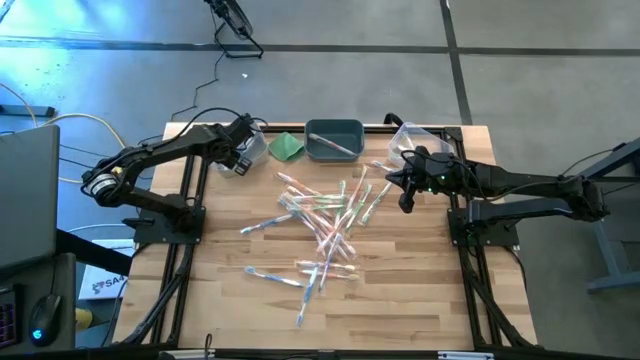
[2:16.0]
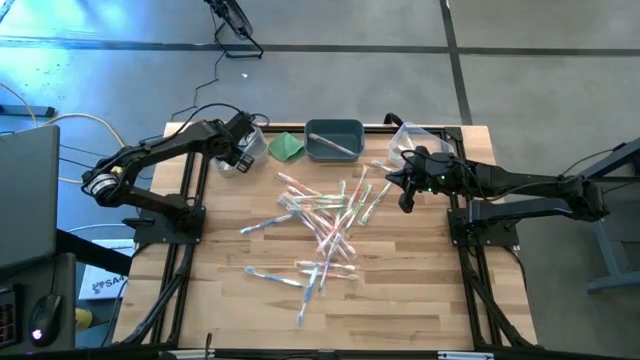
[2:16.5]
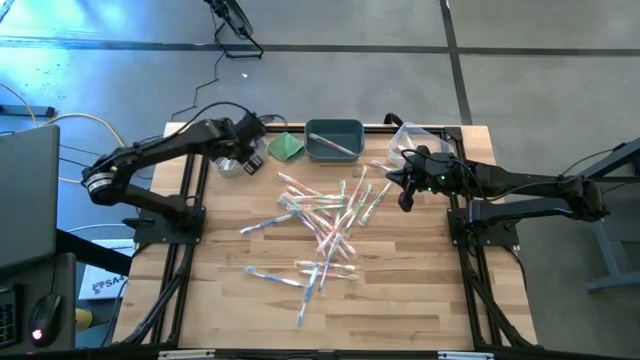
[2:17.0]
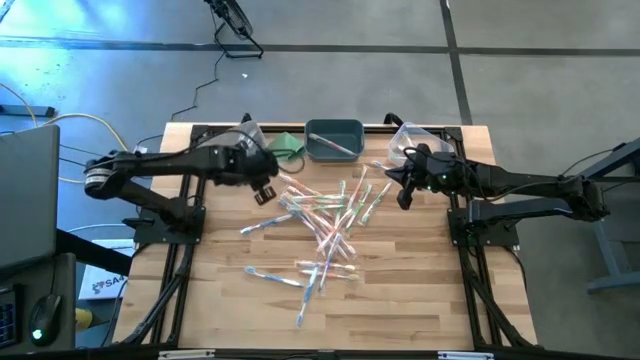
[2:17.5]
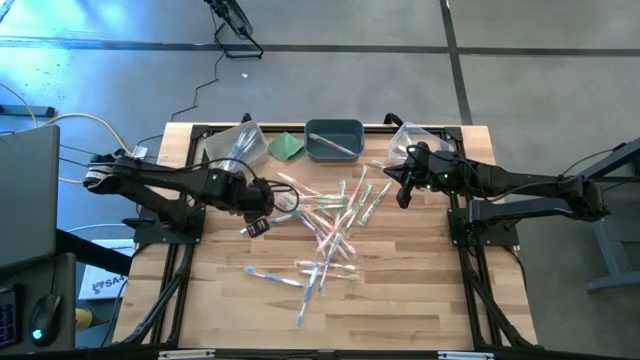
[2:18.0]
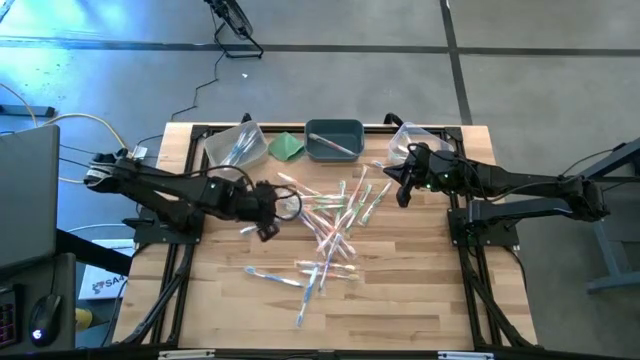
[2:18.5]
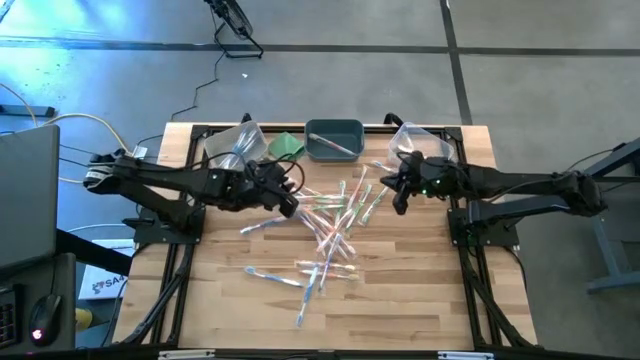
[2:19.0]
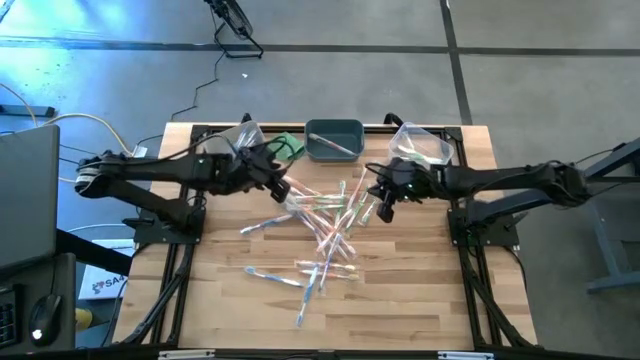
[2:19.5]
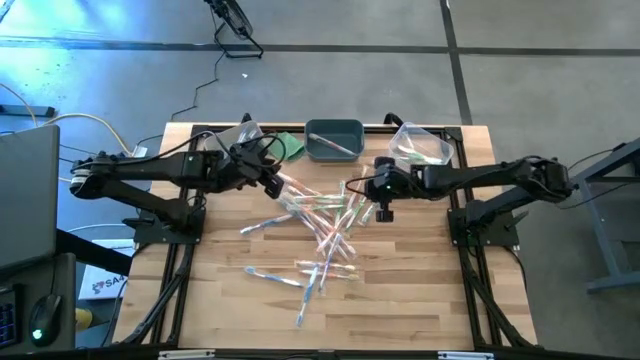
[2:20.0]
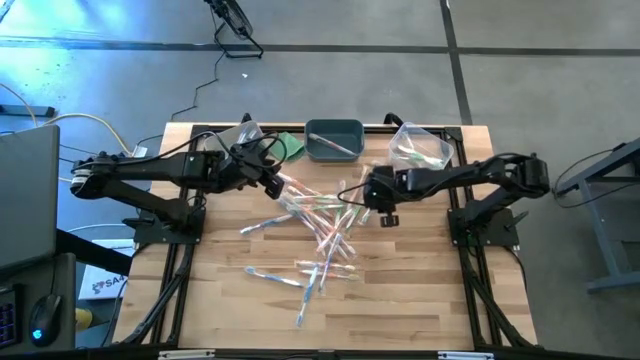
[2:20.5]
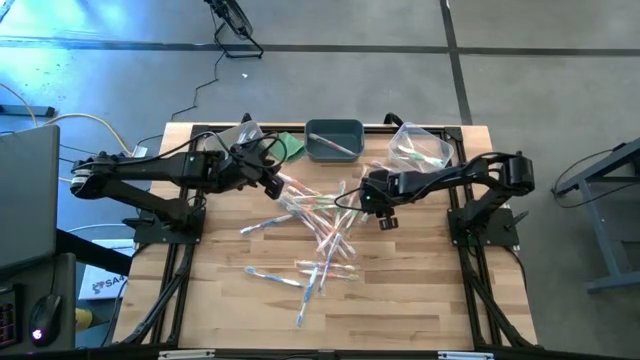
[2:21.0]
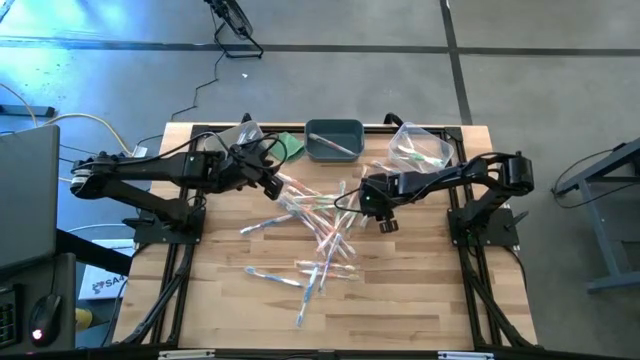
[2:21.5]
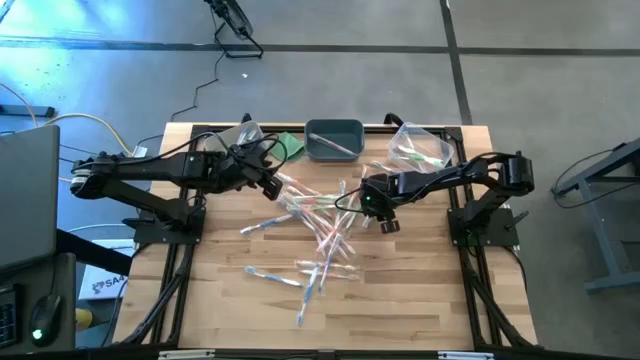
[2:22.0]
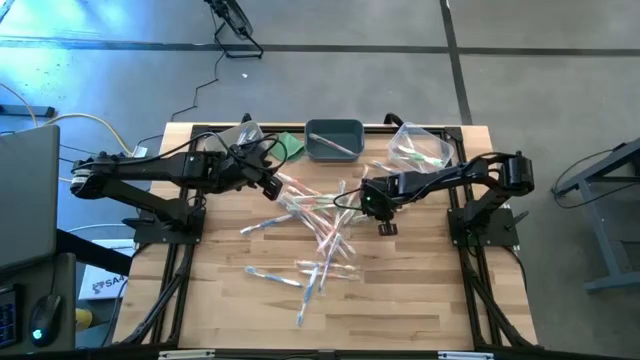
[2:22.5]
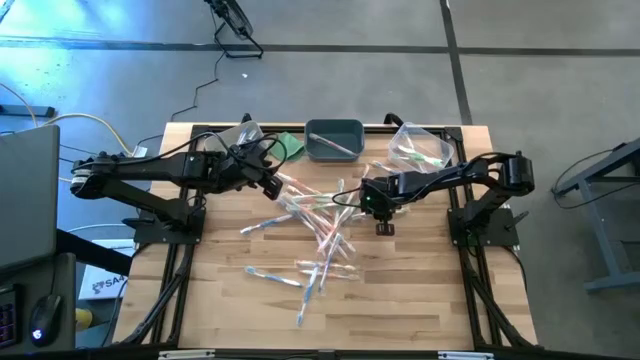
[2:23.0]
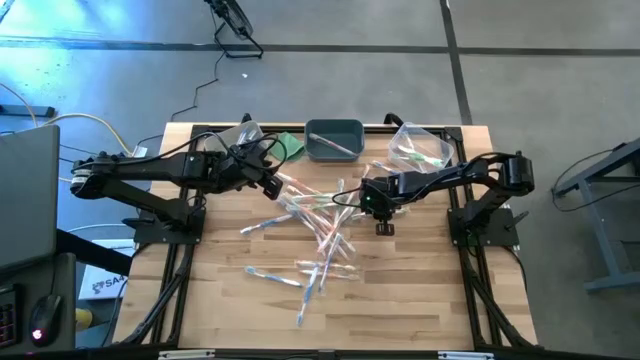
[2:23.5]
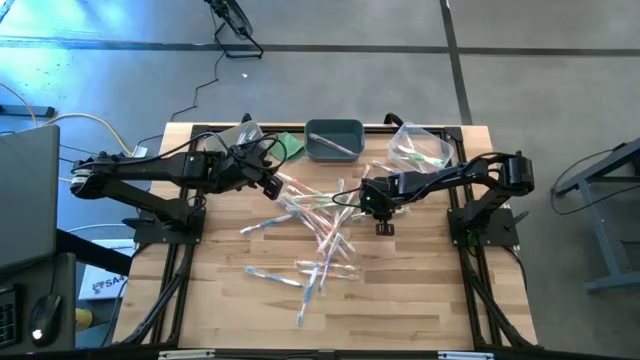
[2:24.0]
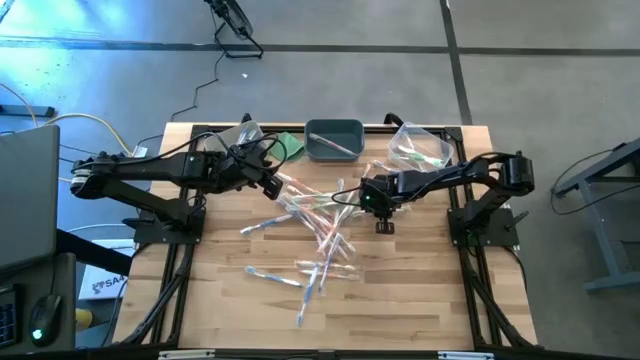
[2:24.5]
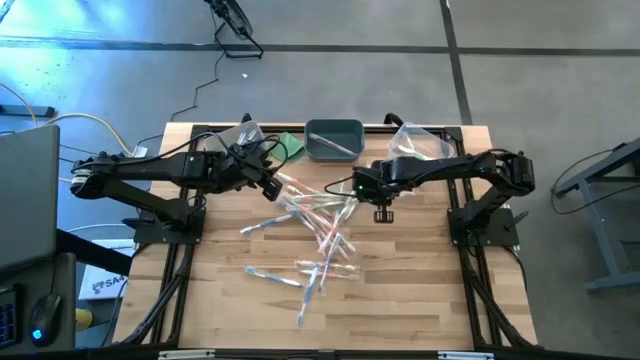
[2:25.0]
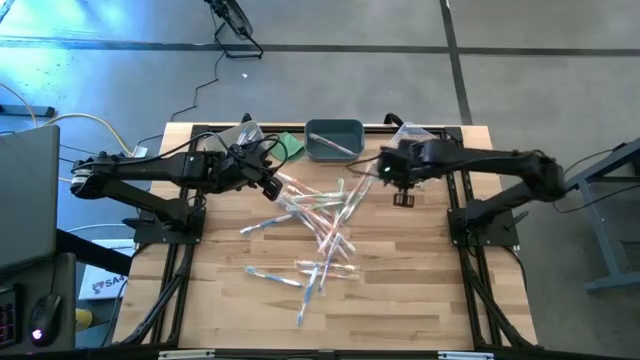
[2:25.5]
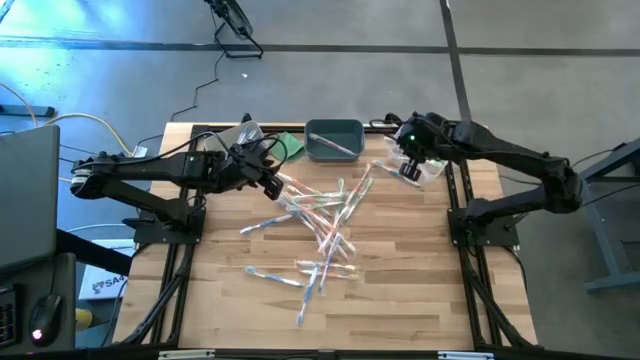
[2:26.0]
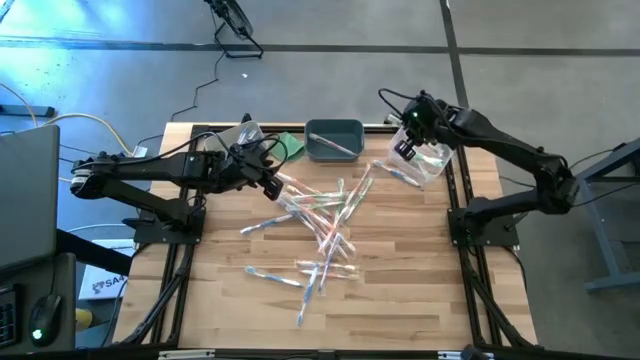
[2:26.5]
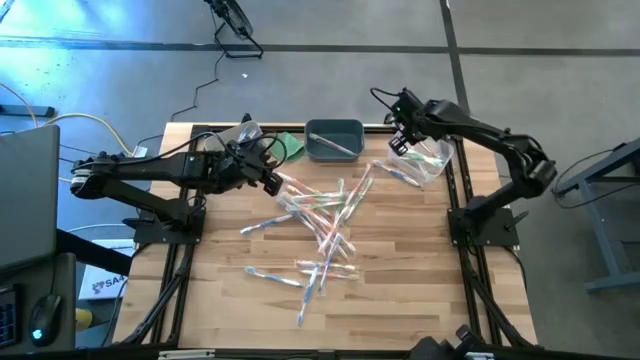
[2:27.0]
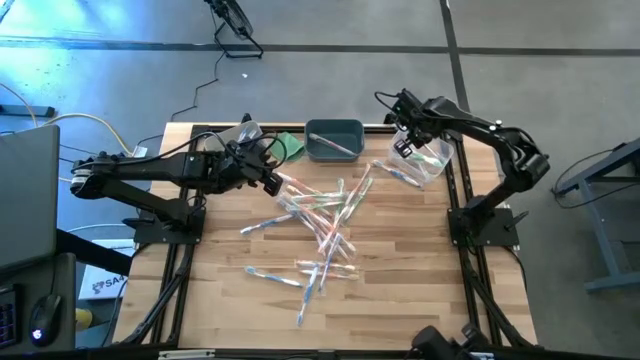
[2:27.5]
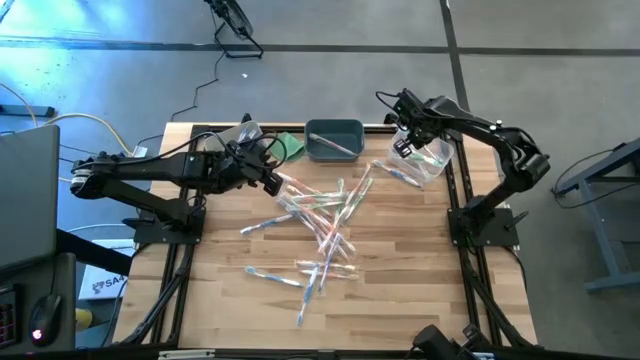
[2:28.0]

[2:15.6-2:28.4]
Task: Pick & Place Toothbrushes
Put the green toothbrush into the transparent bin

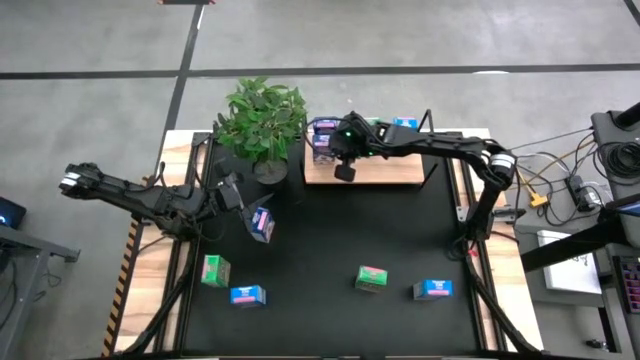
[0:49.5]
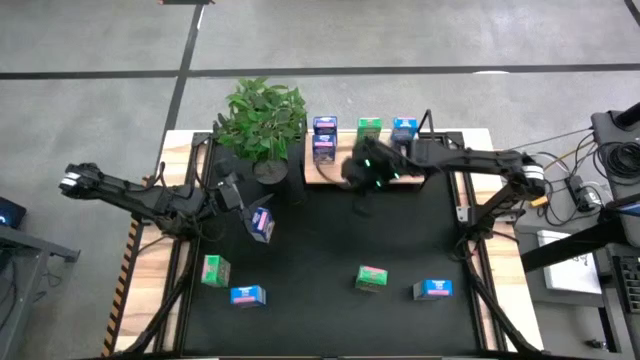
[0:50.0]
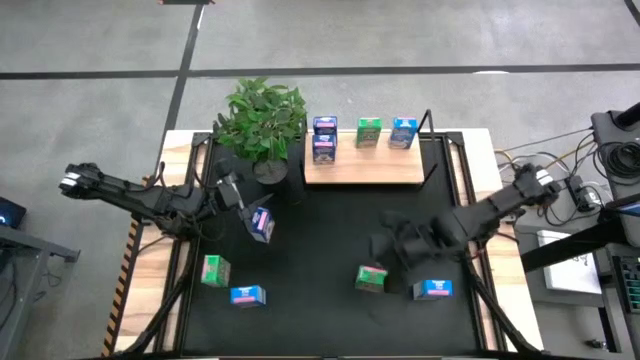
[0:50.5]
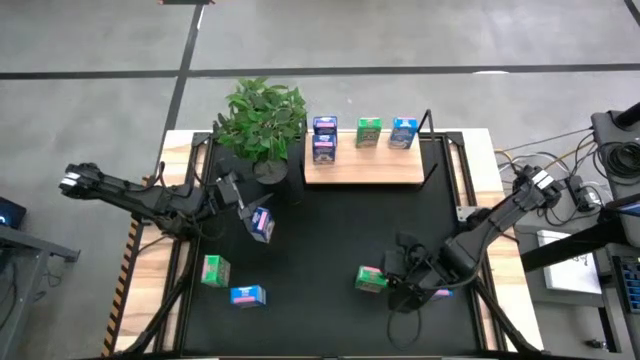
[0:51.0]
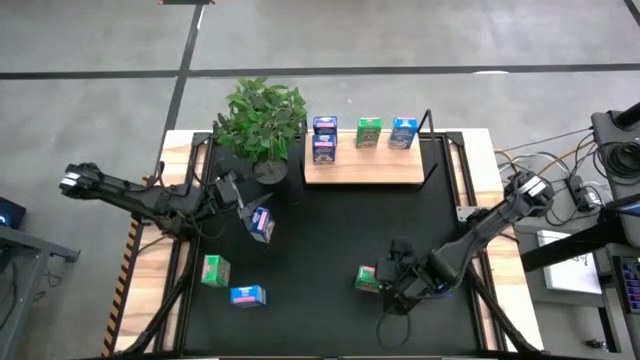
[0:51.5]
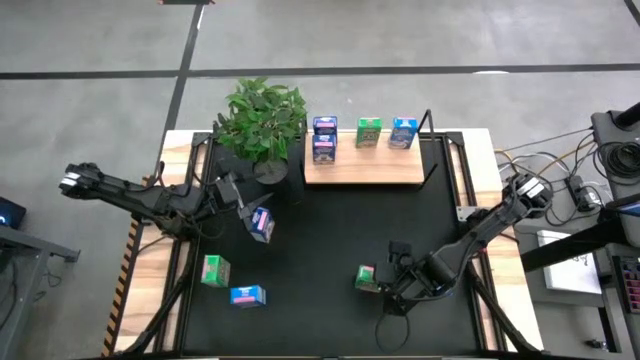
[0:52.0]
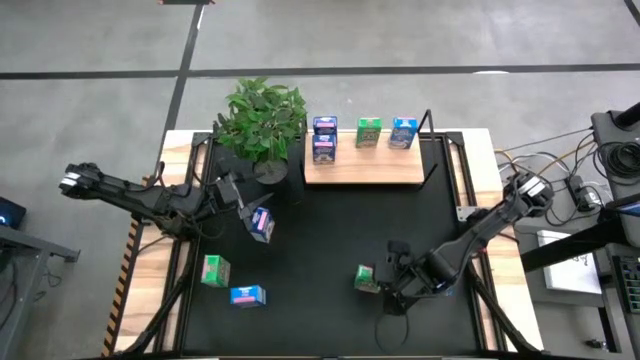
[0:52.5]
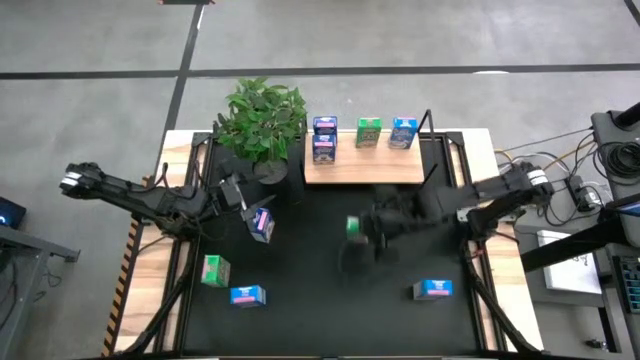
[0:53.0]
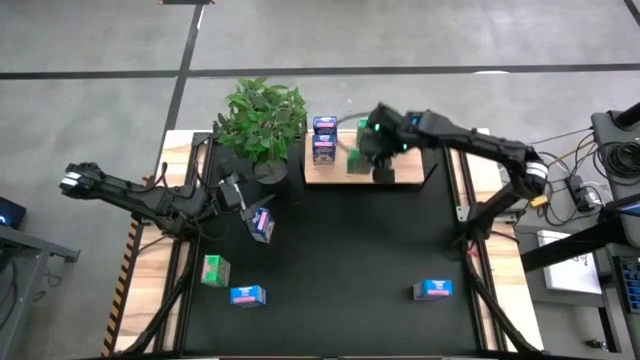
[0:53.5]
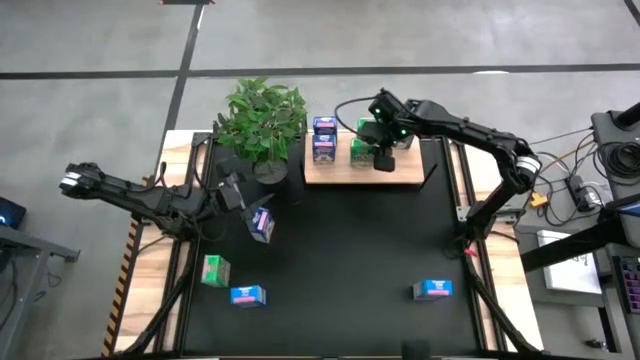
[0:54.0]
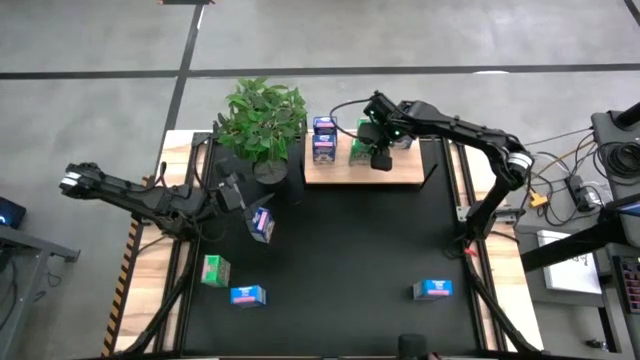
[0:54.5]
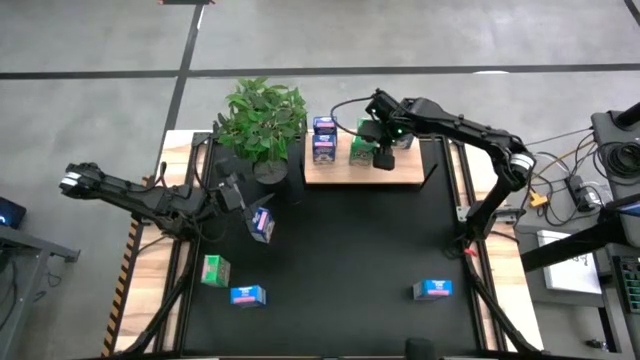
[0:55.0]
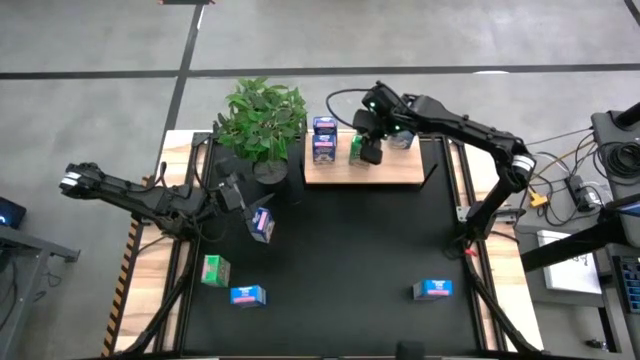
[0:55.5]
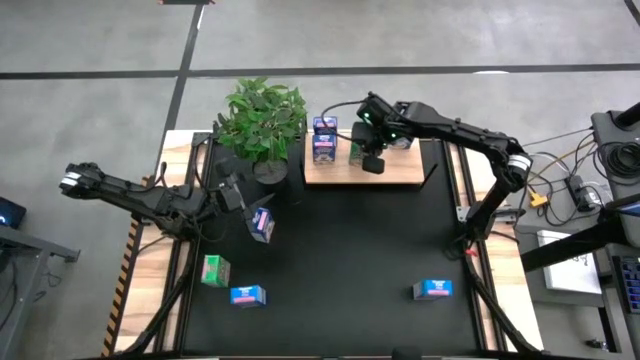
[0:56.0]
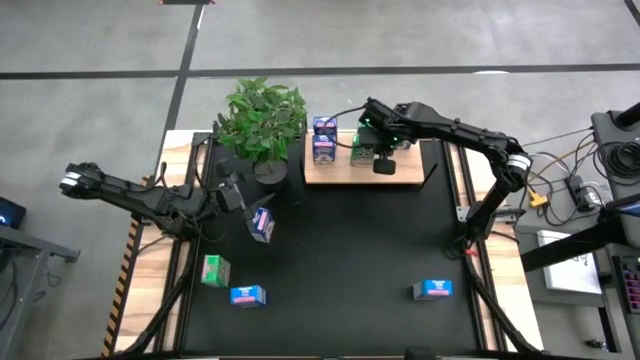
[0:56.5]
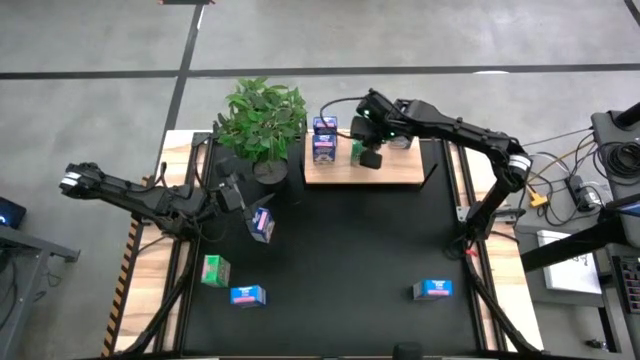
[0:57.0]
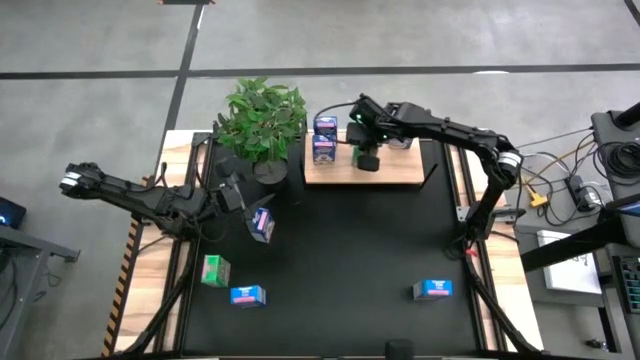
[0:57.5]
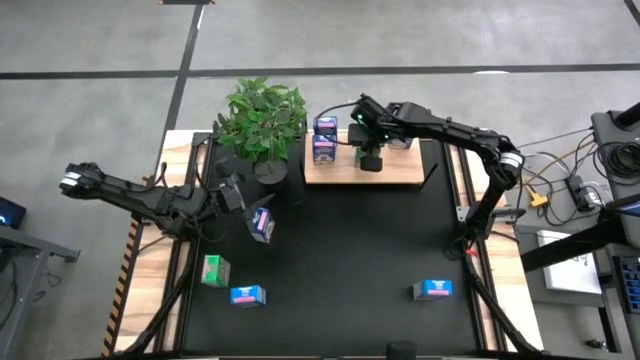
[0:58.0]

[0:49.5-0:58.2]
Task: Stack cereal on shelf
Put the right green cereal box on the shelf aligned with the other green cereal box
